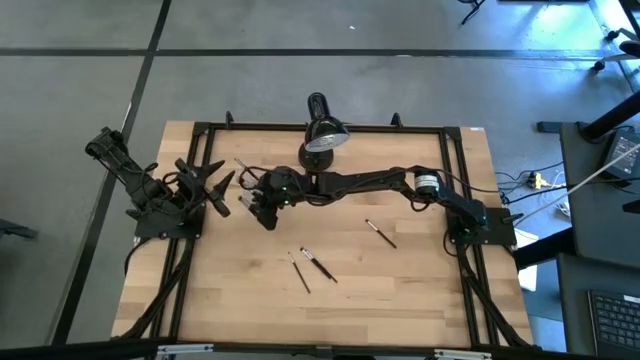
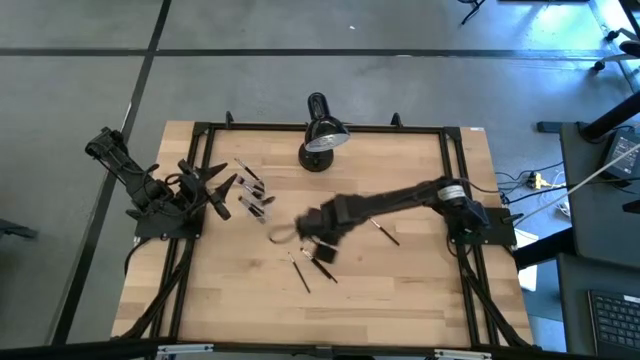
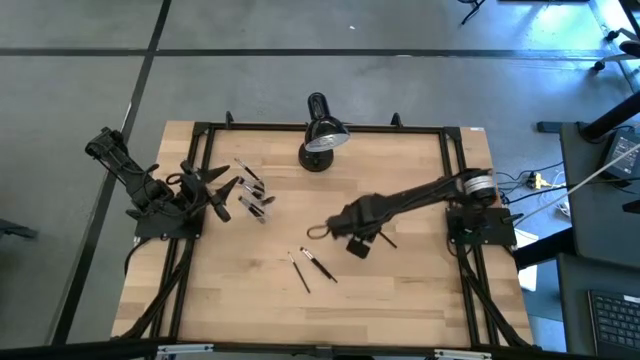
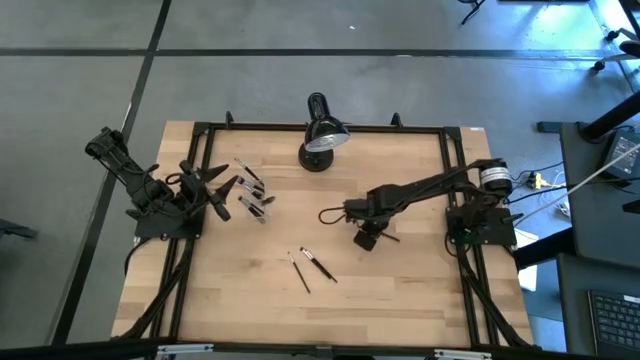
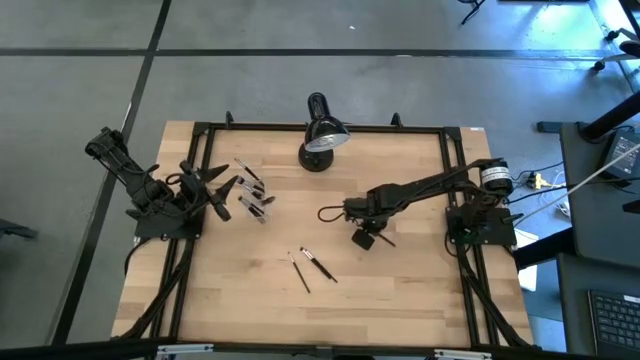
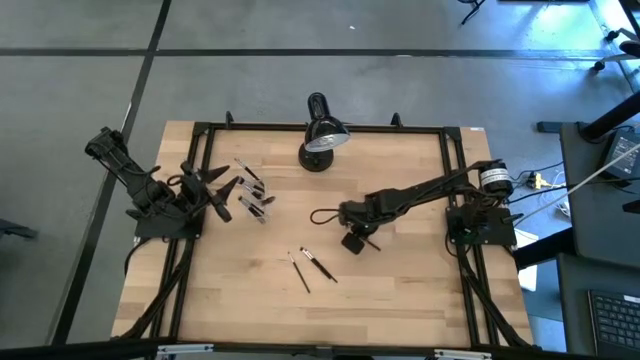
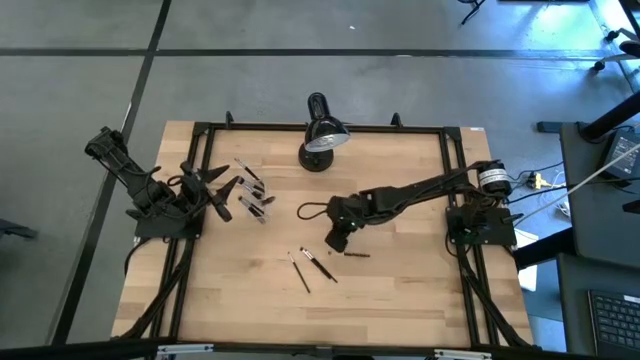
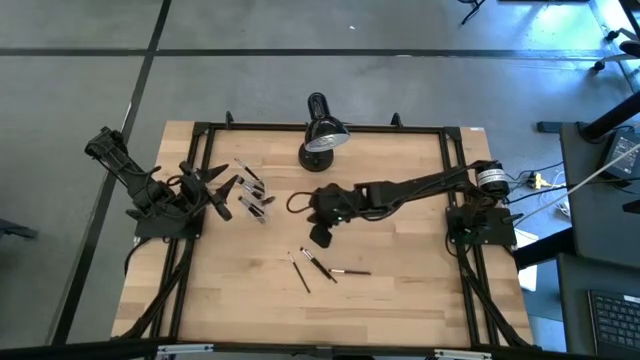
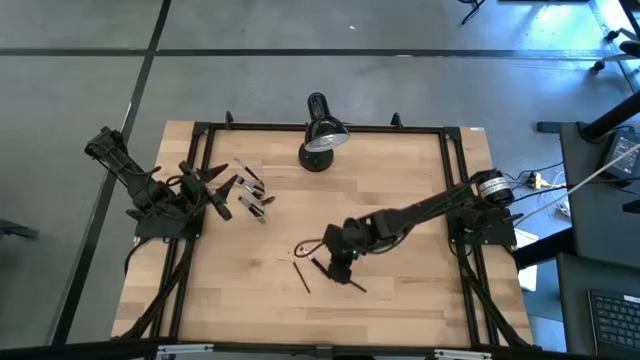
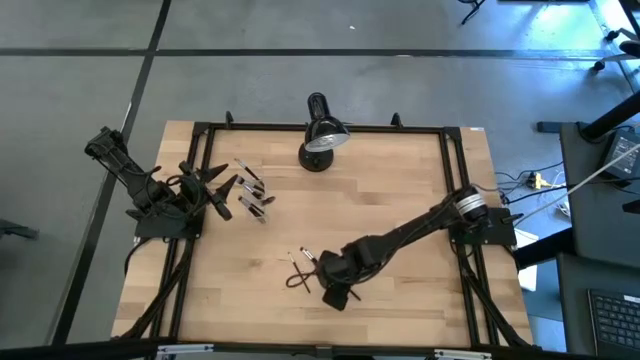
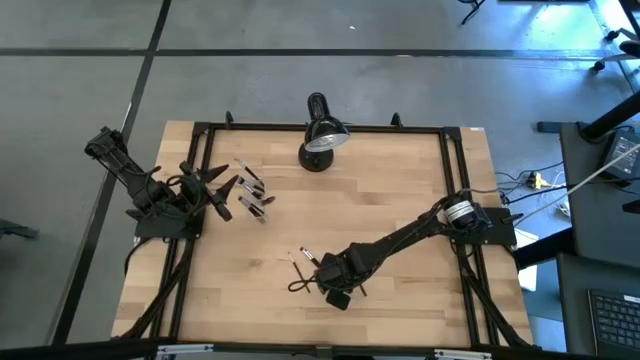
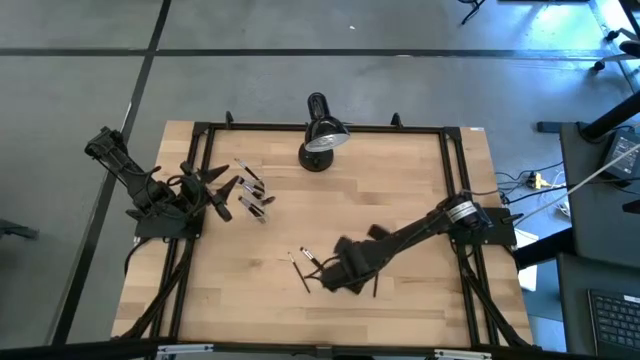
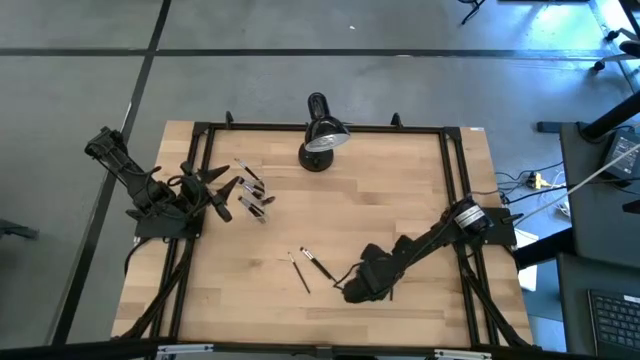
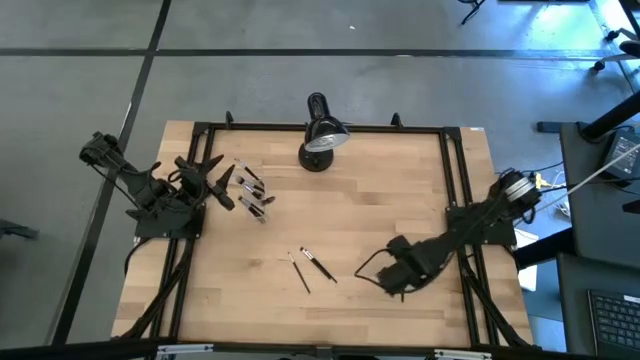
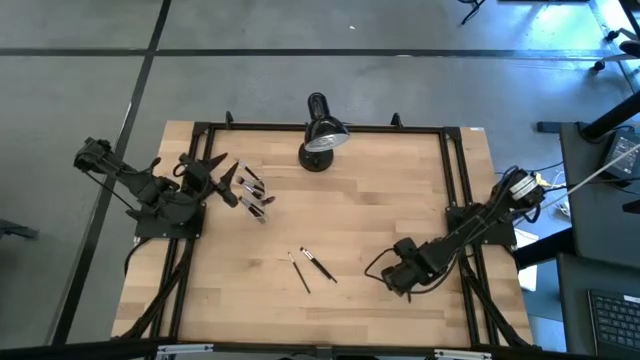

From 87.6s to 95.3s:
Task: Sort items
Put the eyeshadow brush into the transparent organizer

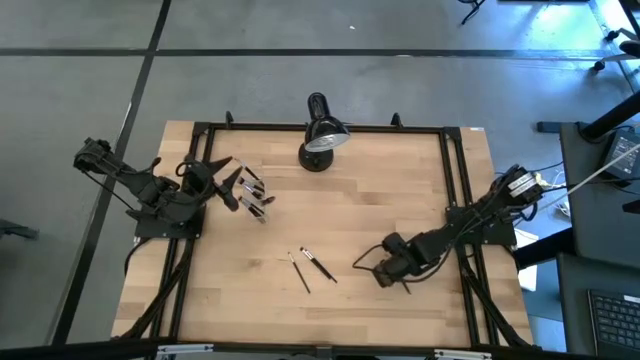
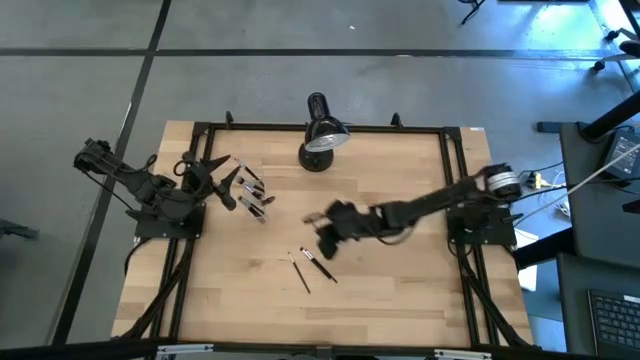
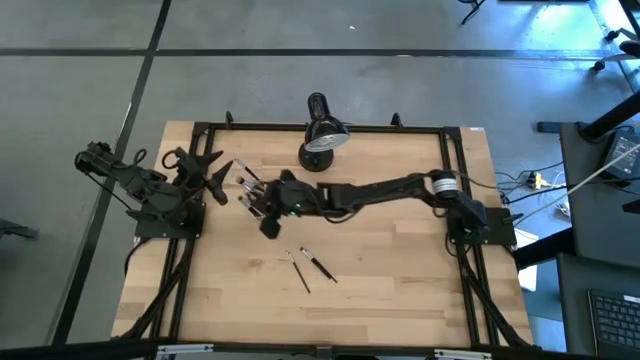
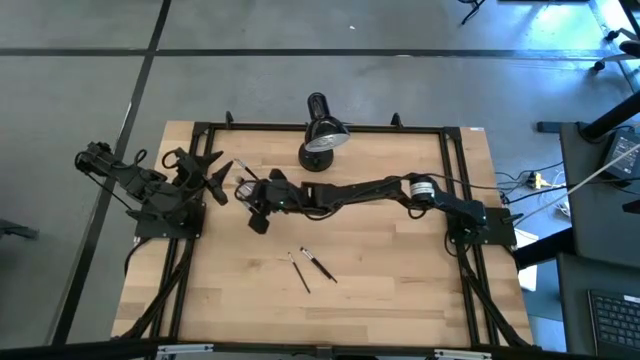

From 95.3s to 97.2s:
Put the eyeshadow brush into the transparent organizer

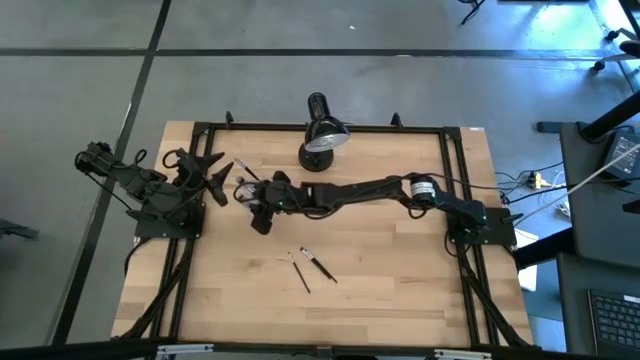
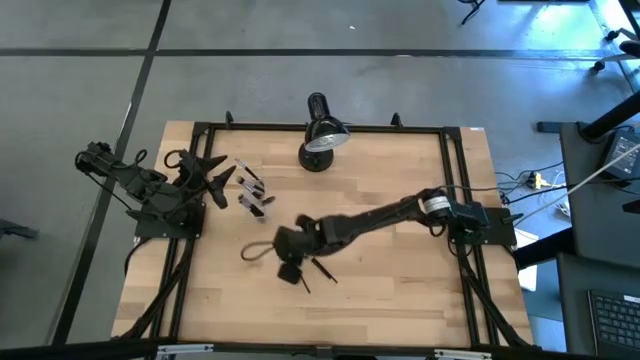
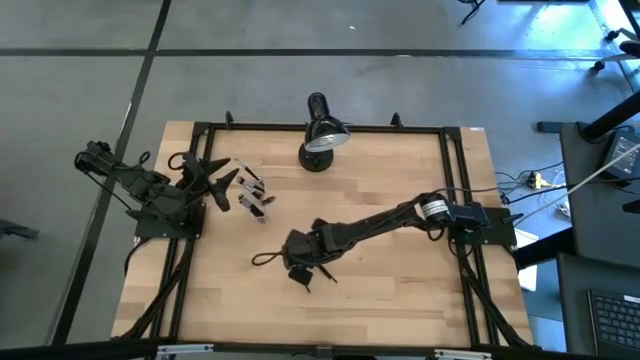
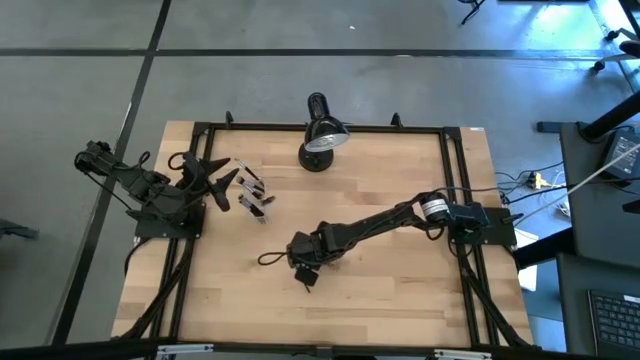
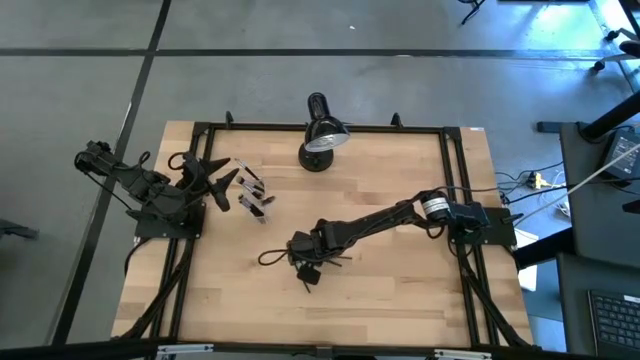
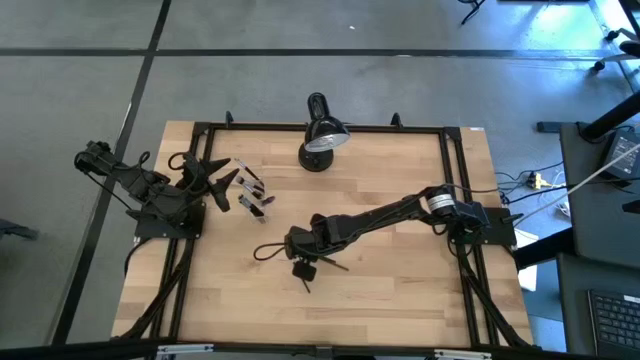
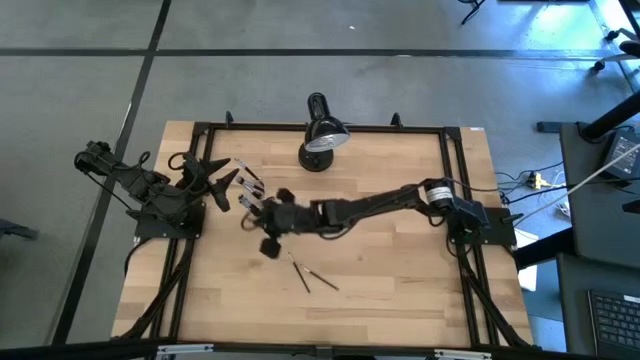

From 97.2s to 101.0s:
Put the eyeshadow brush into the transparent organizer

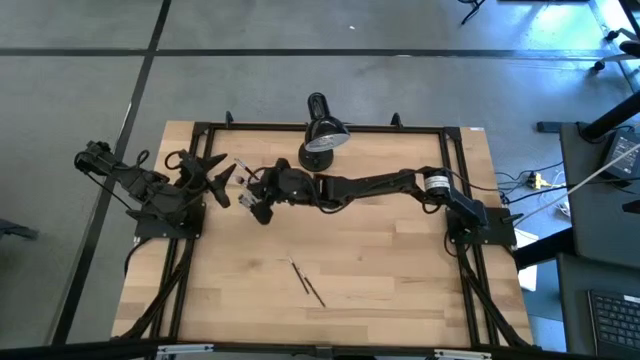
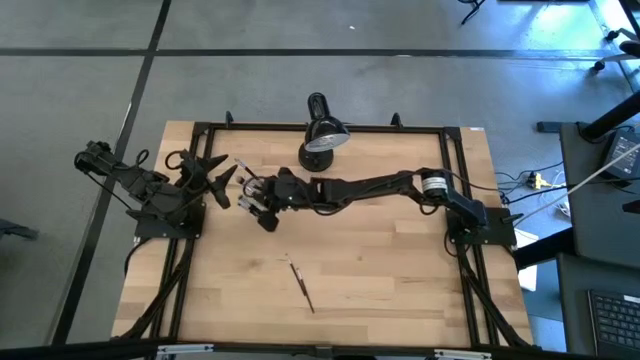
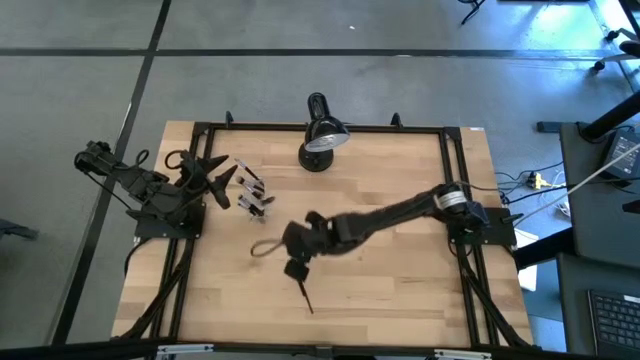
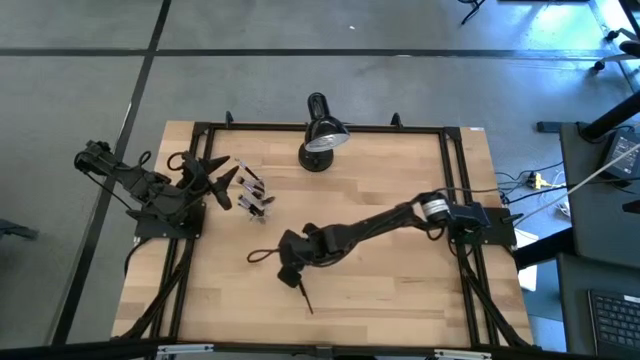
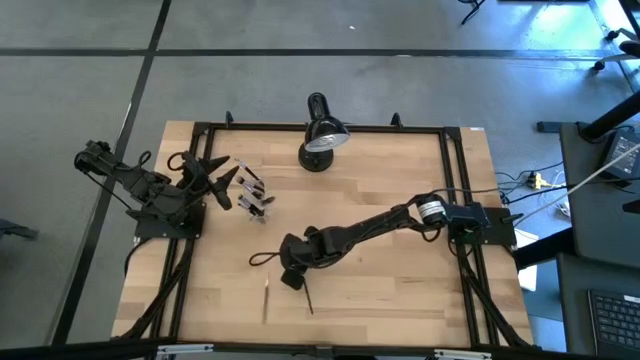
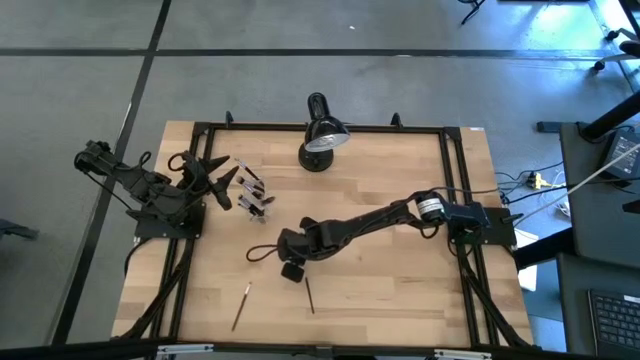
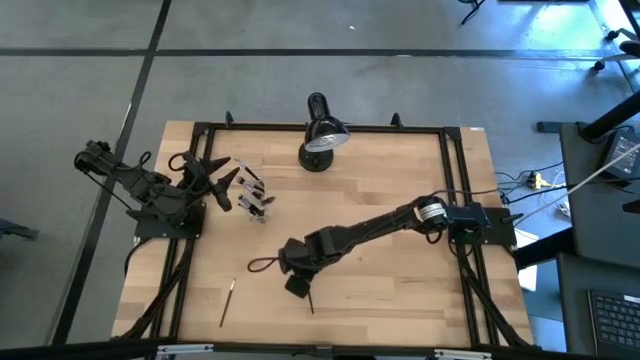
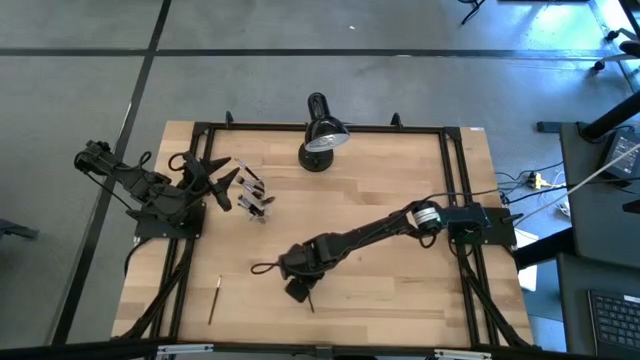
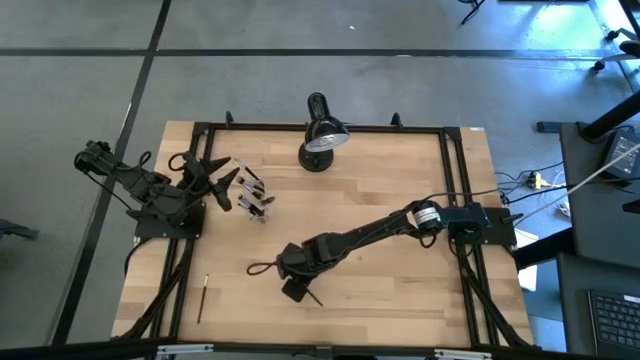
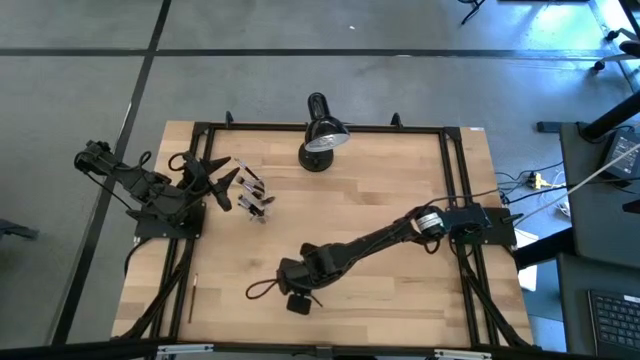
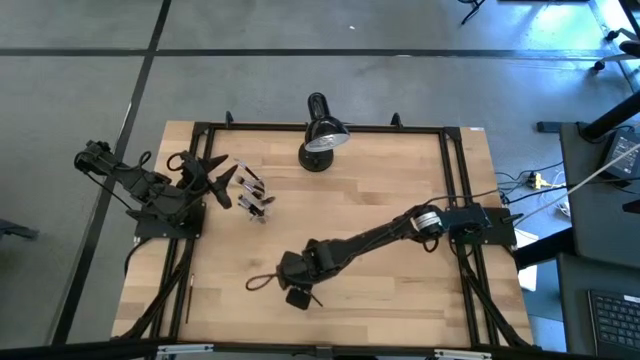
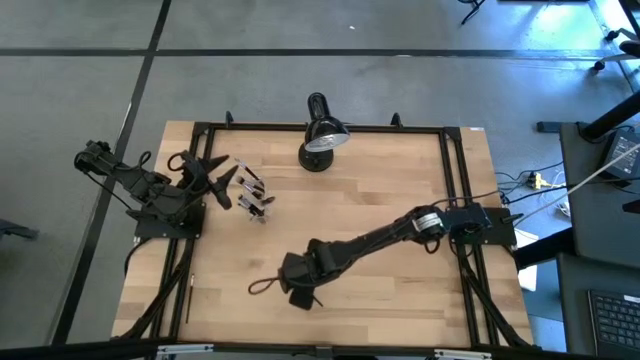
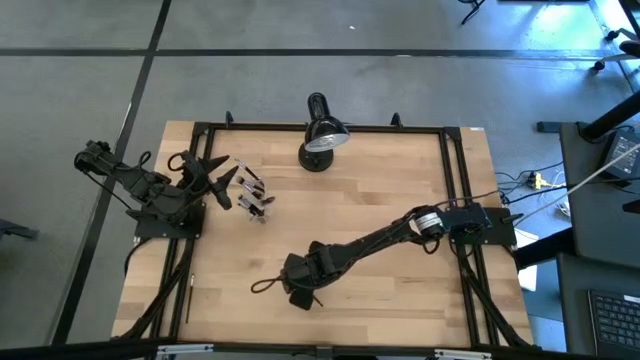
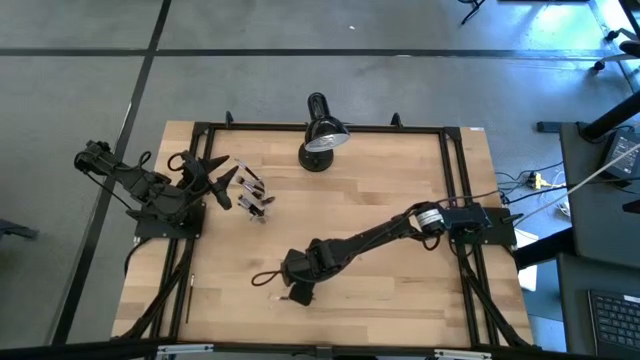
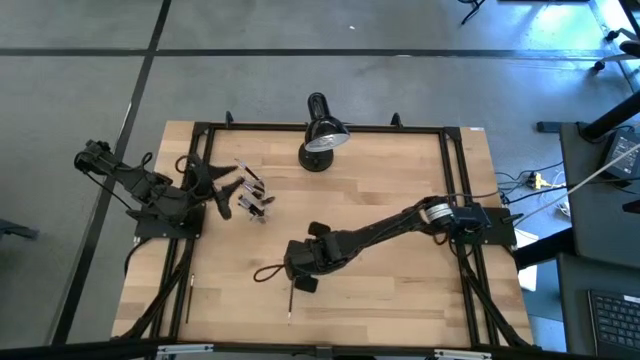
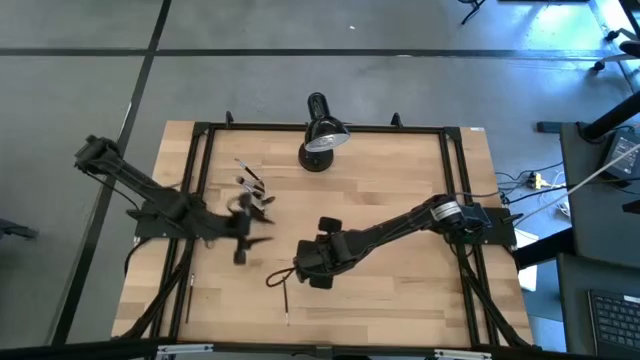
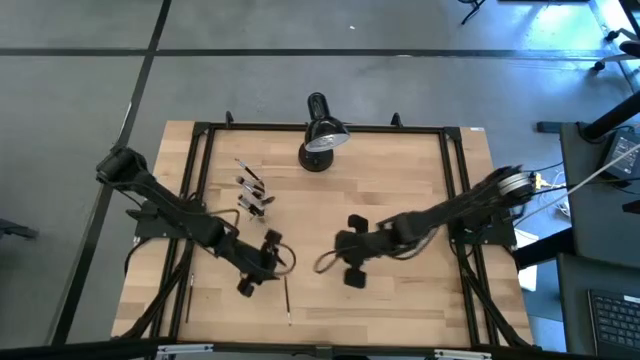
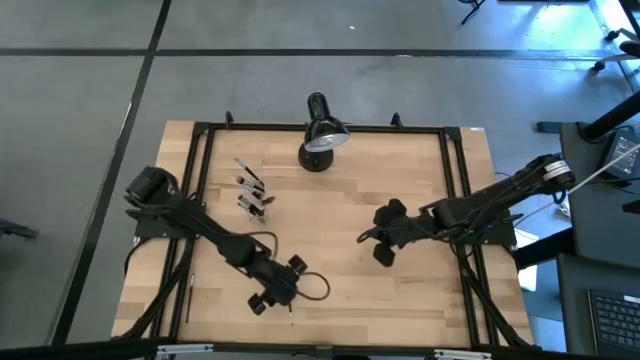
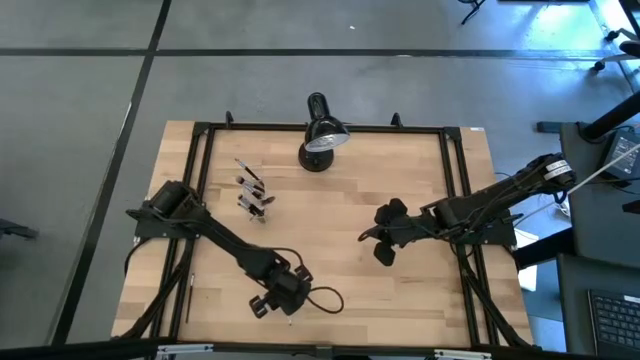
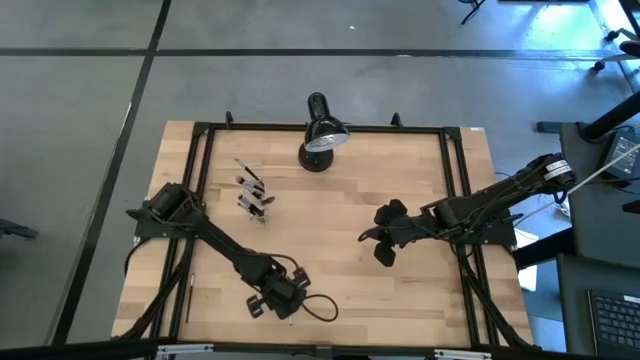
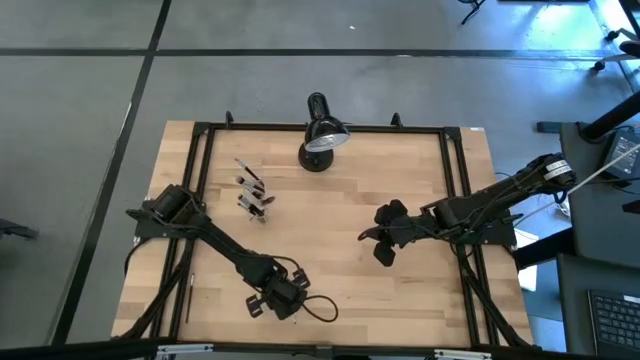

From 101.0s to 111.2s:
Put the eyeshadow brush into the transparent organizer
